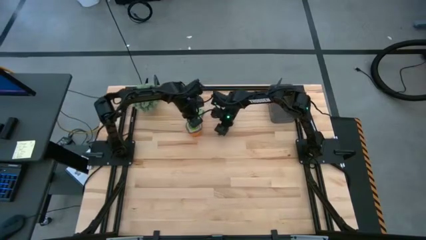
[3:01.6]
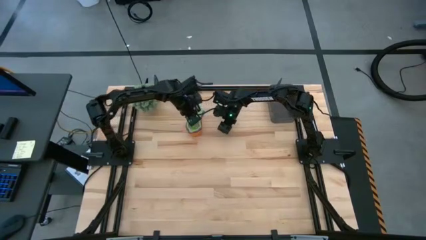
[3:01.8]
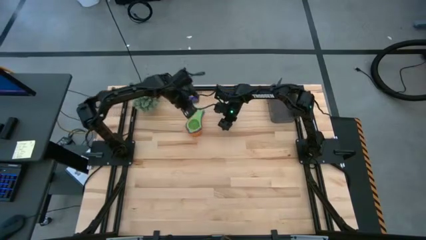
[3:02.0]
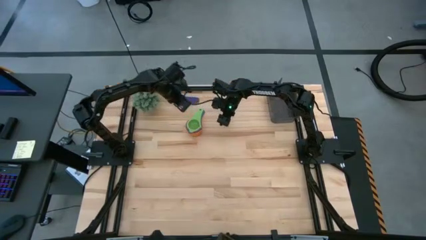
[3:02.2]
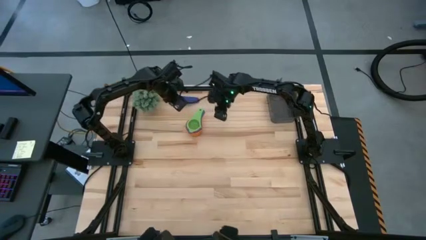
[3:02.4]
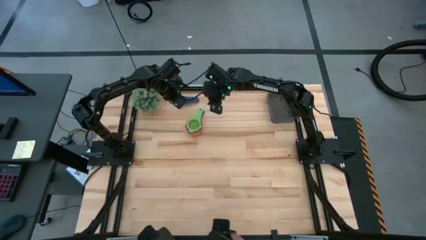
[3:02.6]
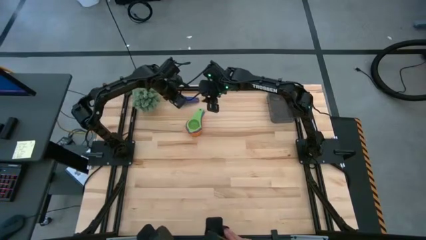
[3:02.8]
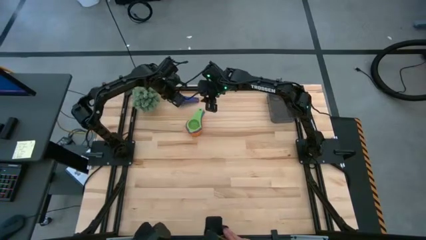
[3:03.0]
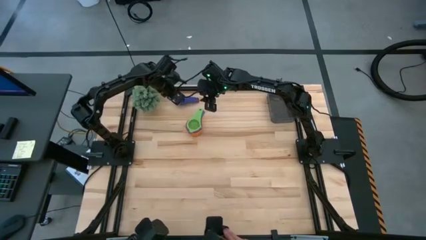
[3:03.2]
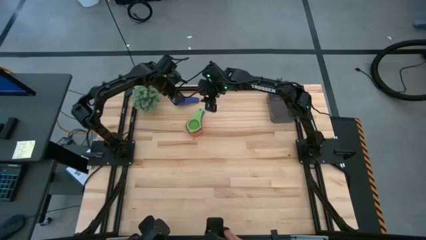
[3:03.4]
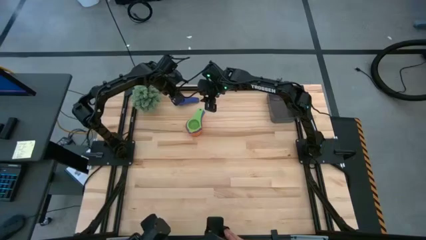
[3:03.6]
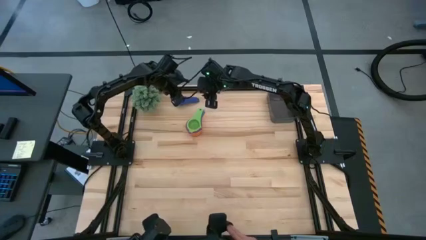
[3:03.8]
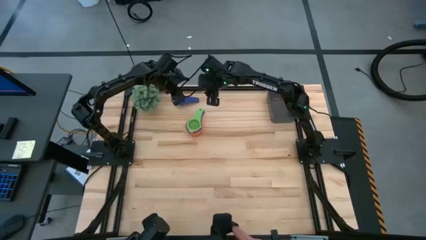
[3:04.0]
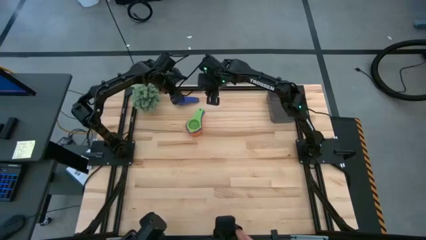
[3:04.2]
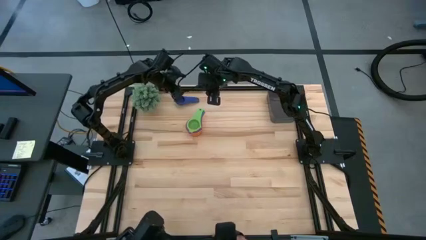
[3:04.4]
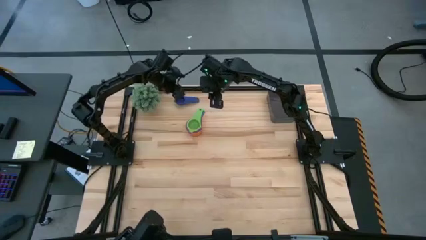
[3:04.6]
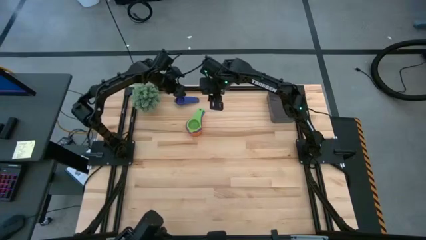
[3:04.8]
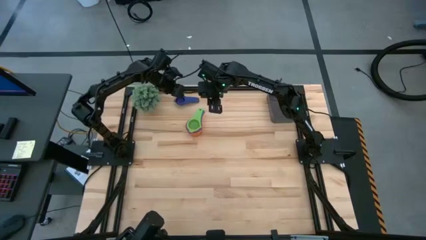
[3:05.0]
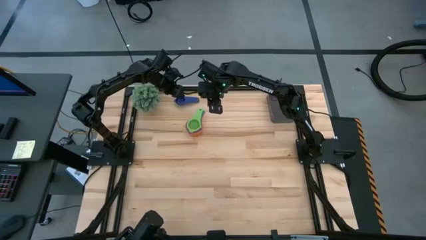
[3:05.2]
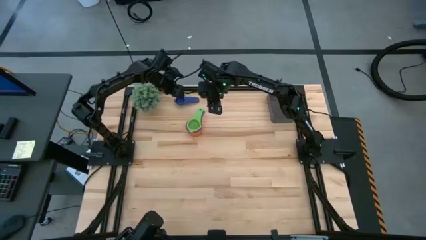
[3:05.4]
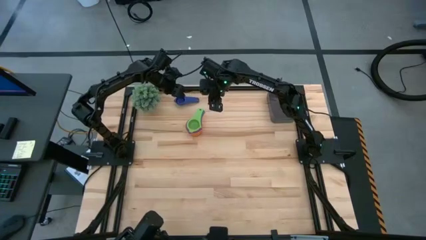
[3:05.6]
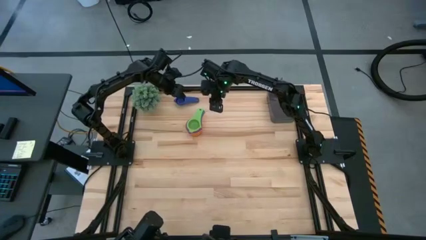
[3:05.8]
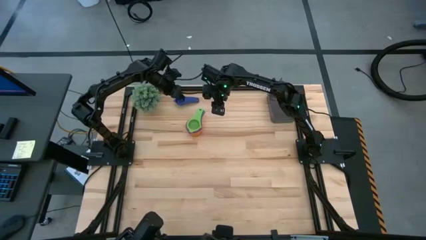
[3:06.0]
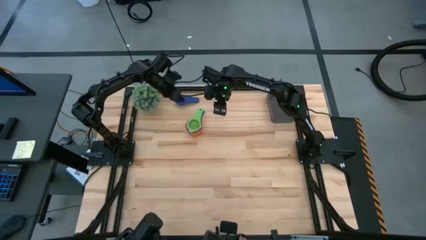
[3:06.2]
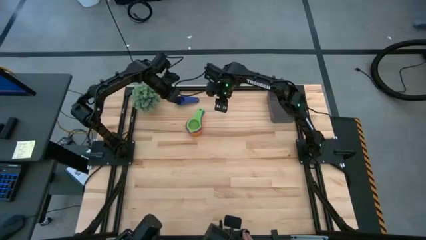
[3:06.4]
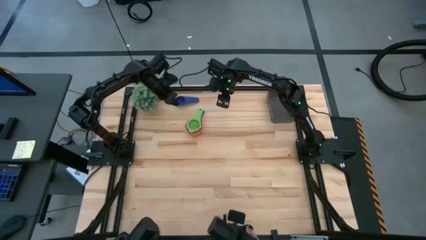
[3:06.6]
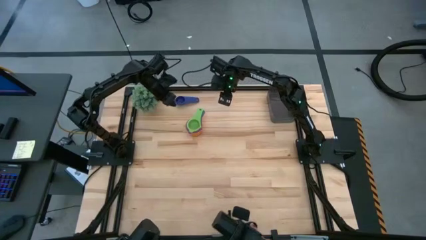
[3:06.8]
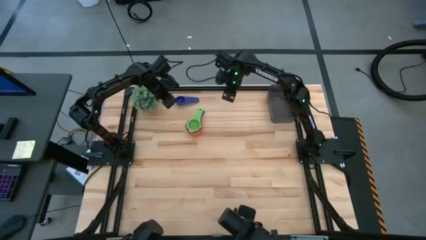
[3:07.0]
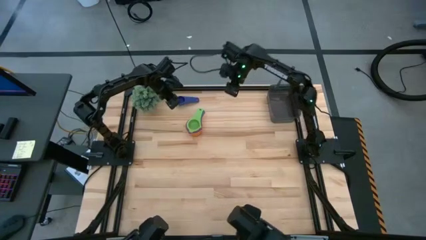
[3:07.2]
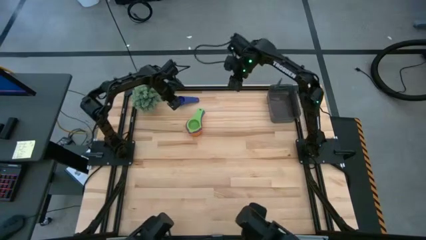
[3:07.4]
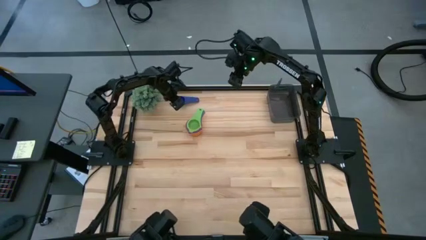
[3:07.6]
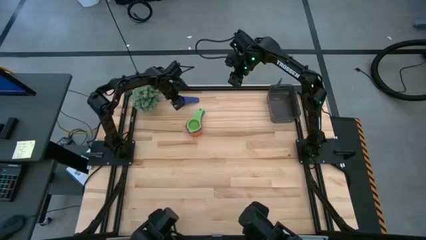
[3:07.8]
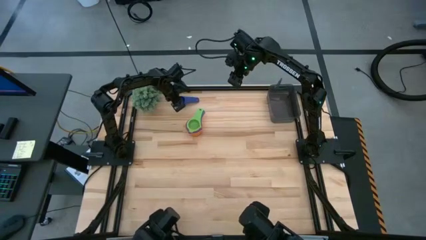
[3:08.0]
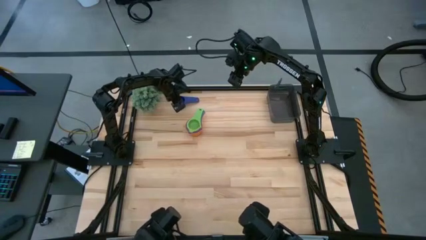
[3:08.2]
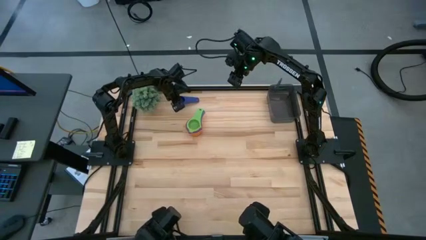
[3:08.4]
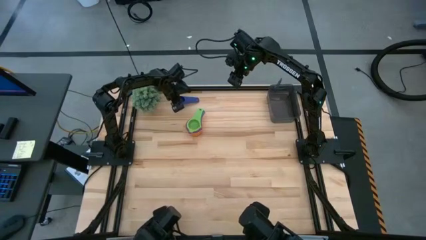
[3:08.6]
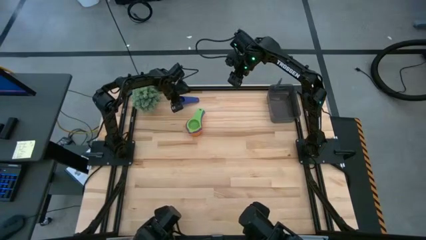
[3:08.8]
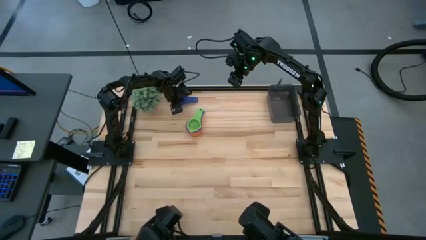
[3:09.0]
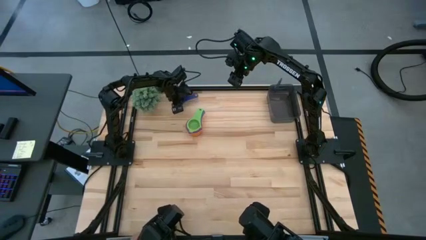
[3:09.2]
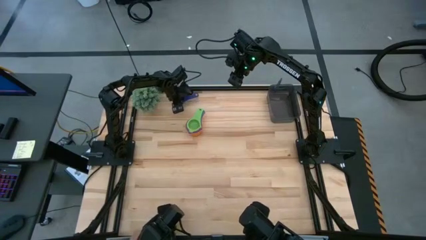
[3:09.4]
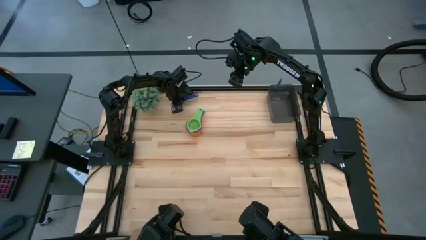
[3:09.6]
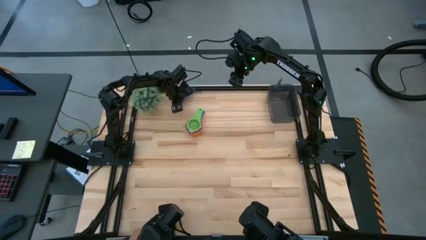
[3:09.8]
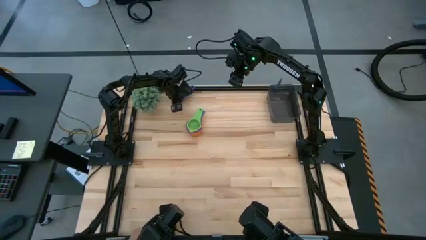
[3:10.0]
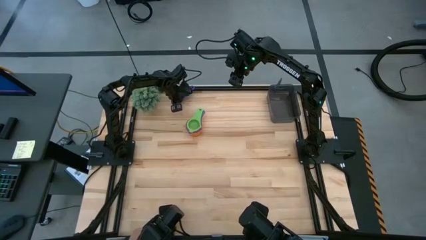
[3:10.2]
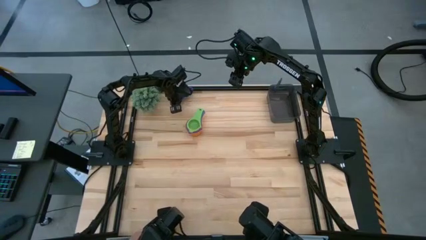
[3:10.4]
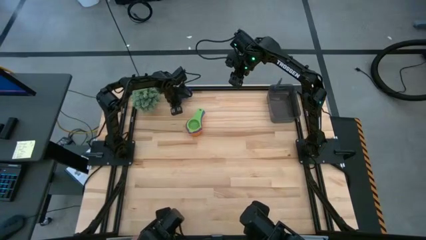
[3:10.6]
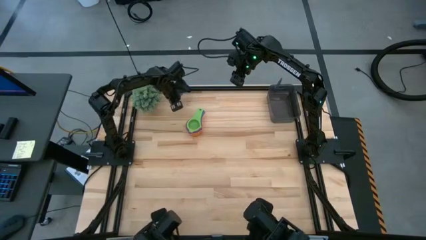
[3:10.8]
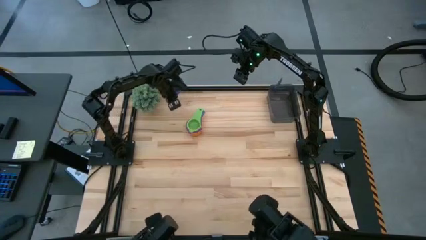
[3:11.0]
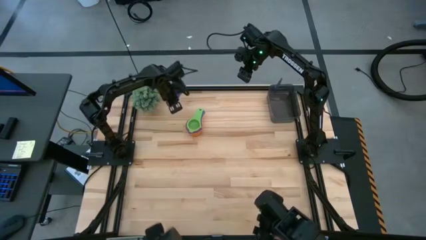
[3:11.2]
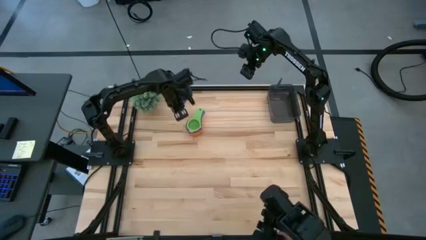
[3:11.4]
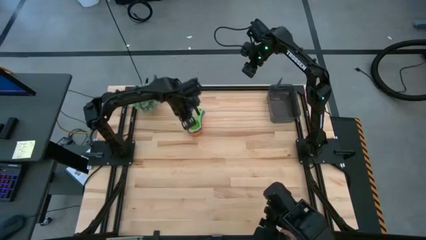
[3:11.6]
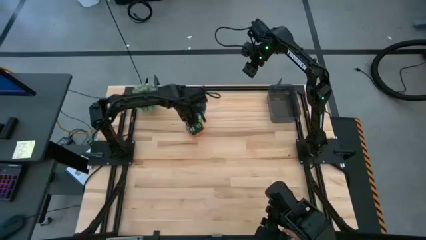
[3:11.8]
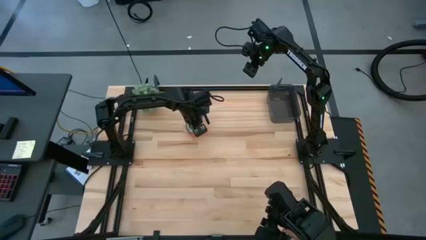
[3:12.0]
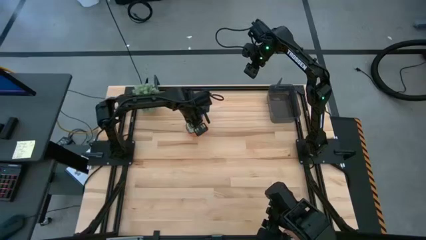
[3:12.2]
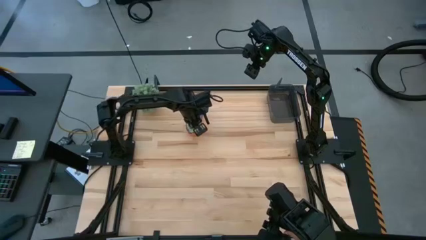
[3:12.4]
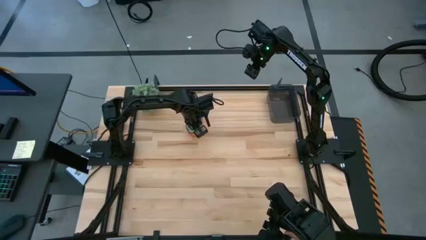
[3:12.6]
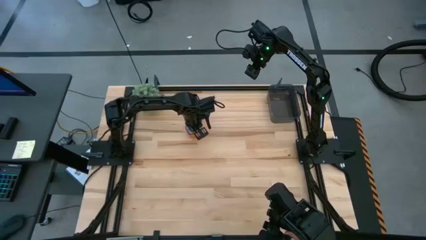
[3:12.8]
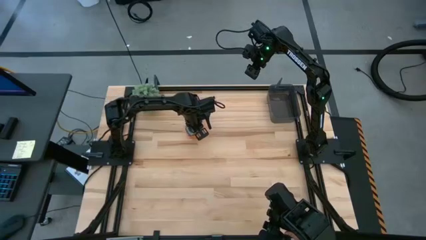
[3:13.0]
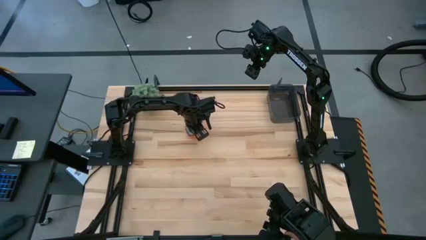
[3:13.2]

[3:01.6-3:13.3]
Task: Nest measuring cups in basket
Stack the dark blue measuring cup on top of the green measuring cup

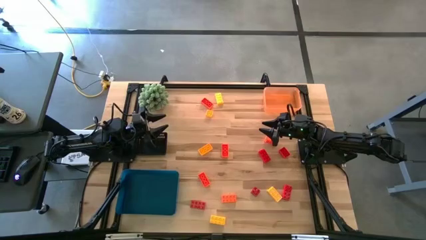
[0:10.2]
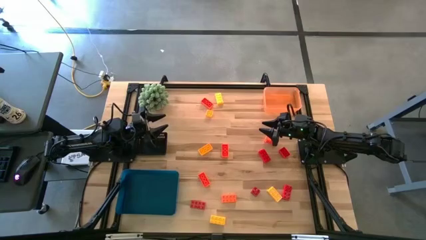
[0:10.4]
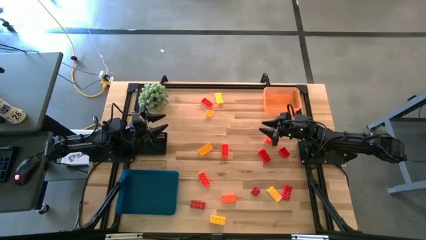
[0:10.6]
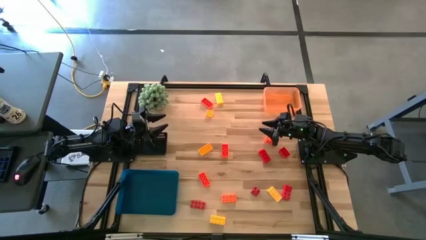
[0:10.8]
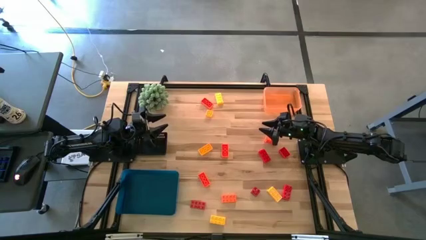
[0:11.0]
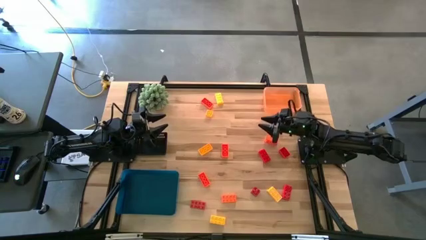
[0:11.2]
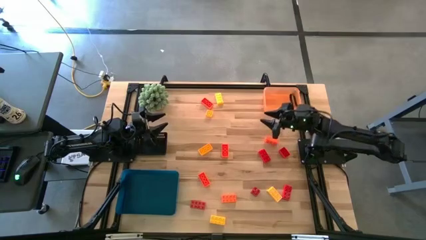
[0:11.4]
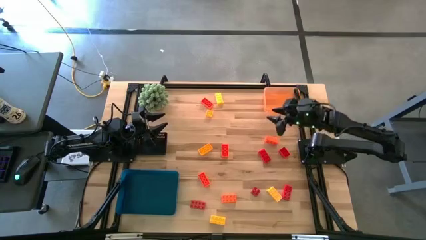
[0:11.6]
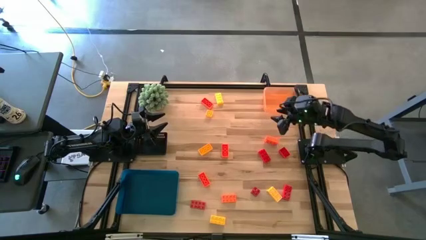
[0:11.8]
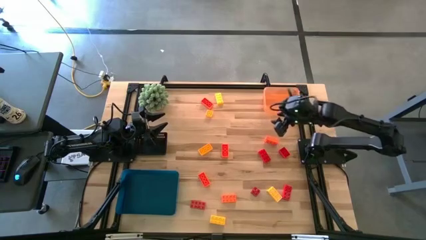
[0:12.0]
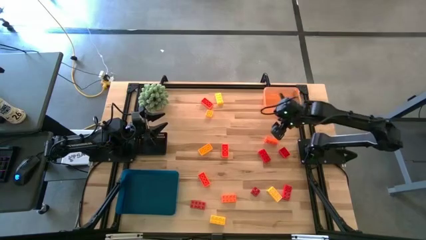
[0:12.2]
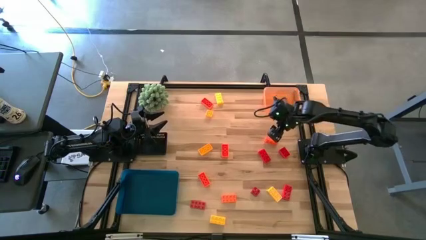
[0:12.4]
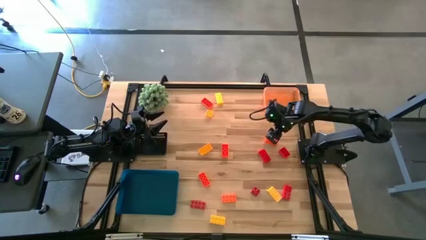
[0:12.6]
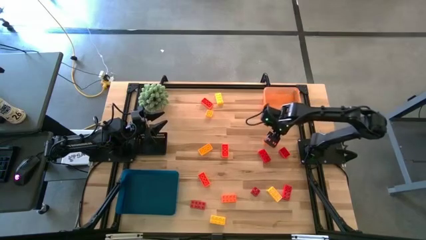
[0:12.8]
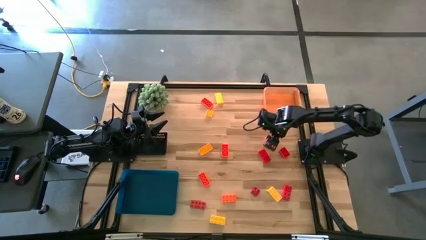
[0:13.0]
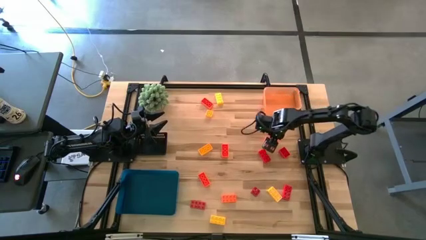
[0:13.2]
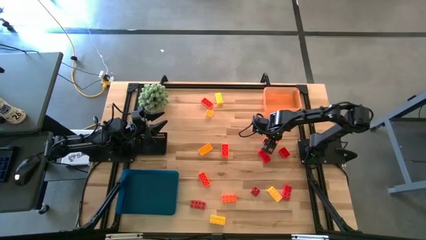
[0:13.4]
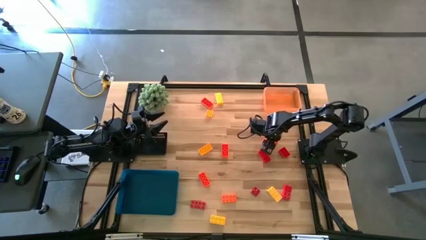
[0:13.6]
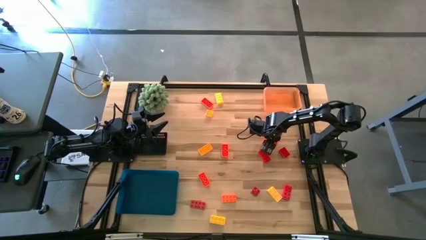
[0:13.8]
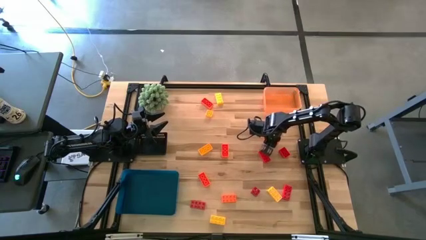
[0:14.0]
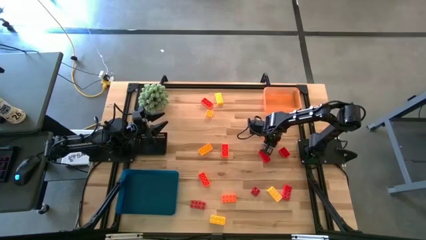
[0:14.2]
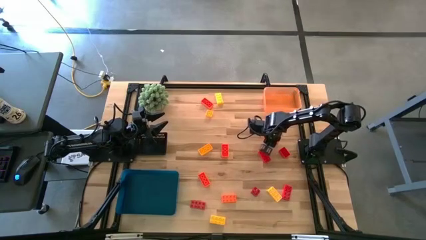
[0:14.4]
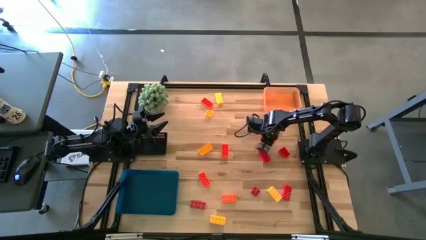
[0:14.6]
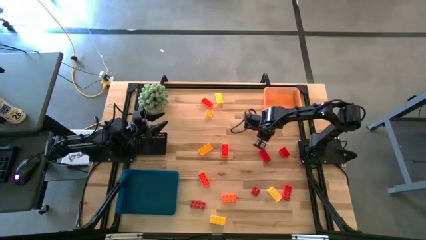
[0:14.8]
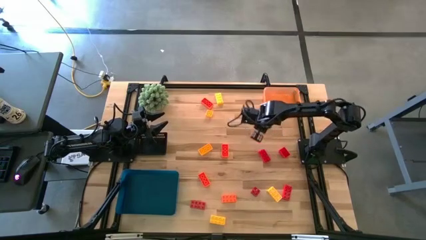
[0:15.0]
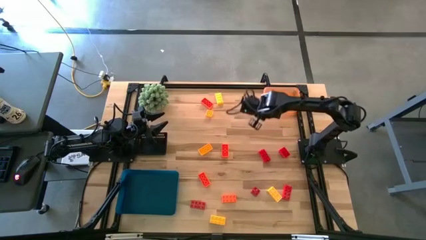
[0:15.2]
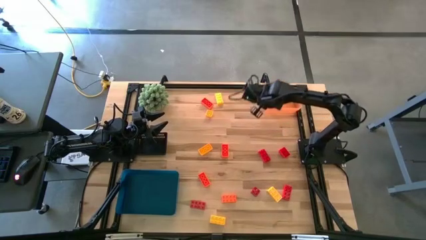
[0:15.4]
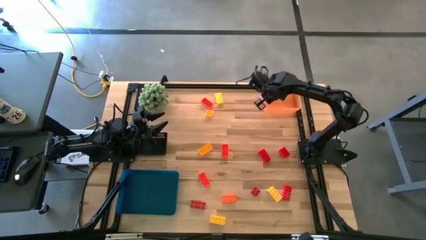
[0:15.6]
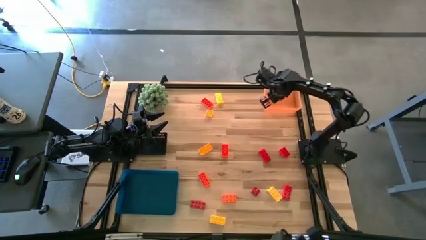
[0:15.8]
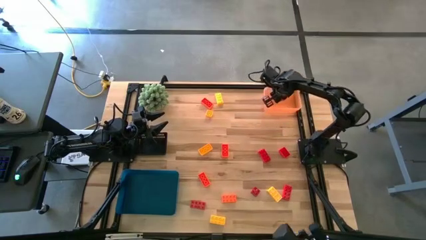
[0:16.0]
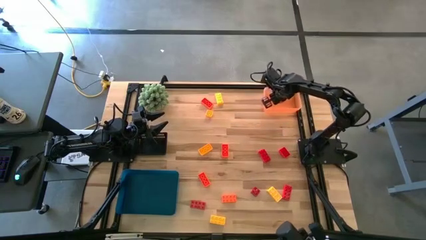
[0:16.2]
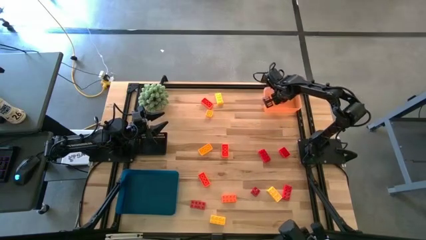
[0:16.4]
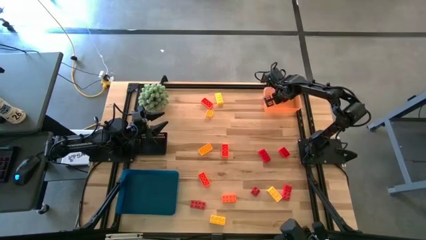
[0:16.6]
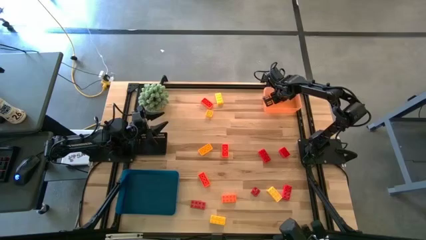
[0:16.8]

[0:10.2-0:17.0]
Task: Sort & place blocks by color
Put the orange game piece into the orange bin
